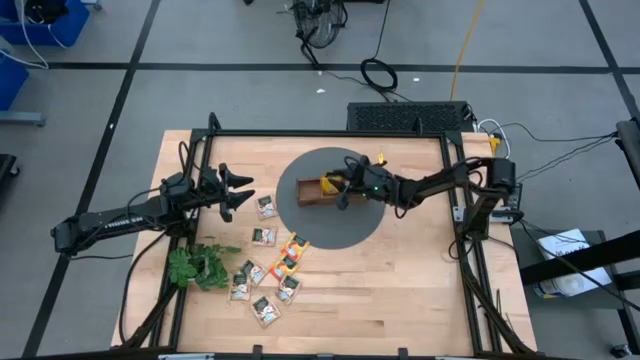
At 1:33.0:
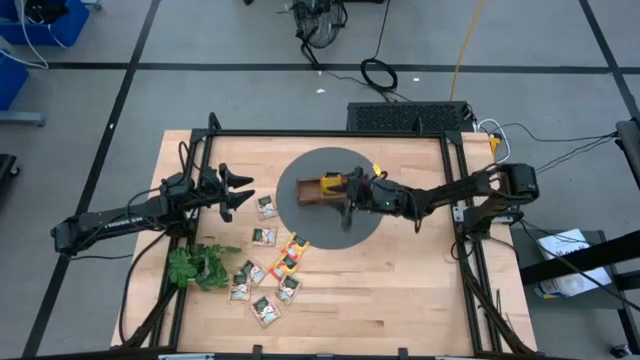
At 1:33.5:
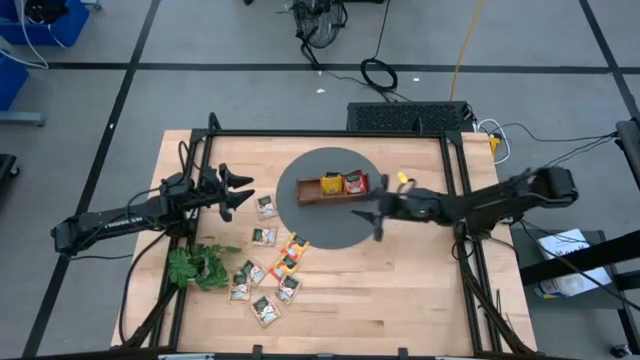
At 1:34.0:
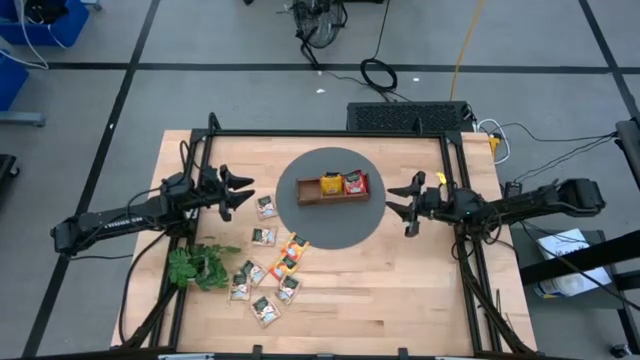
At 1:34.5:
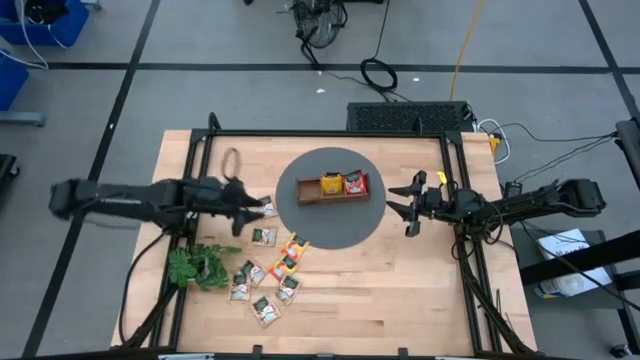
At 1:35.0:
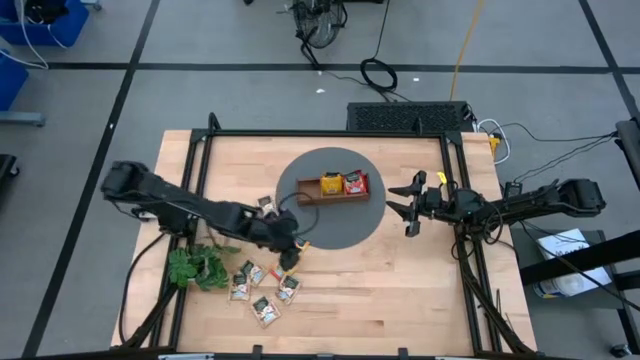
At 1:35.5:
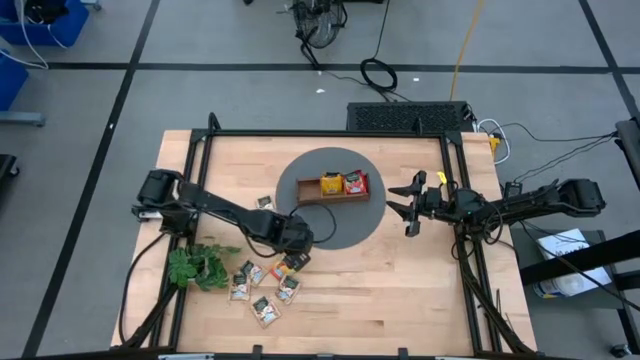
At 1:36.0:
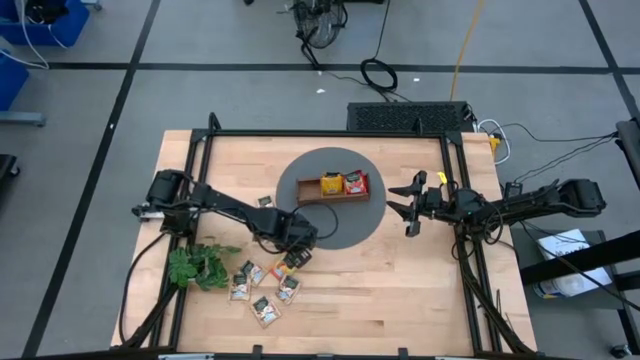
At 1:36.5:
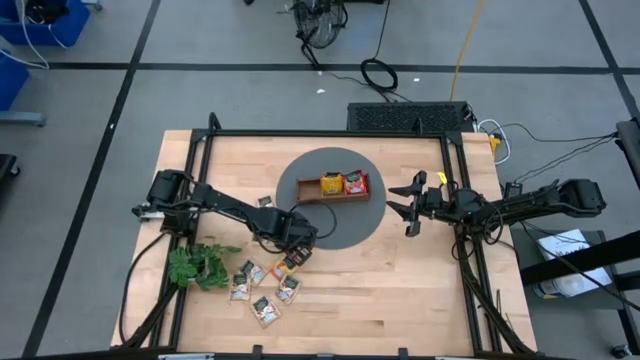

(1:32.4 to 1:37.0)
Task: Pick & Place Tea
Put the yellow tea bag into the middle section of the wooden organizer

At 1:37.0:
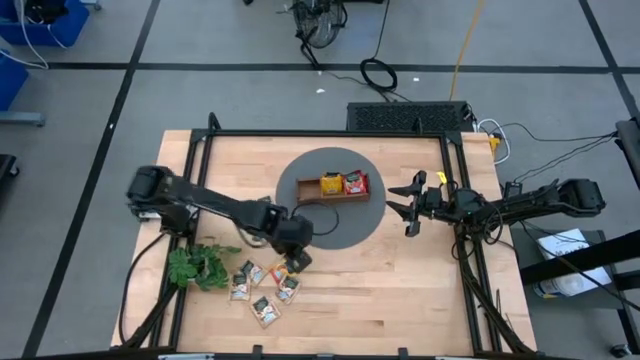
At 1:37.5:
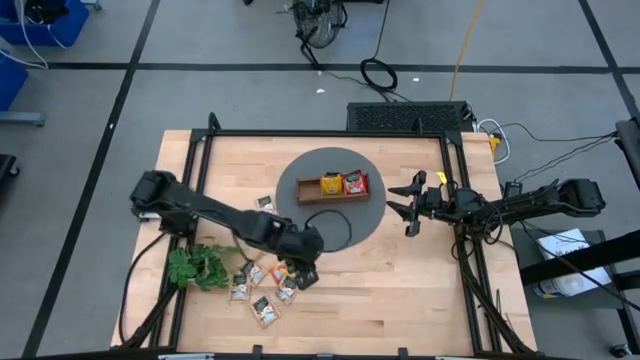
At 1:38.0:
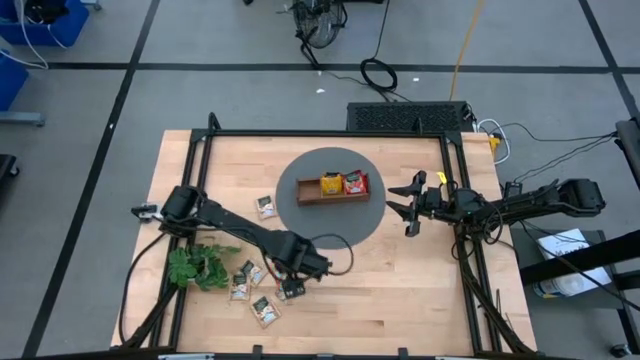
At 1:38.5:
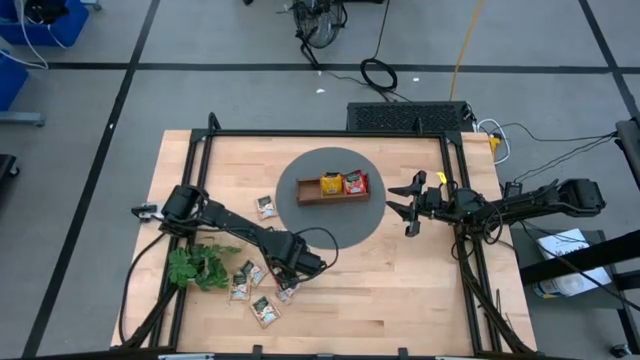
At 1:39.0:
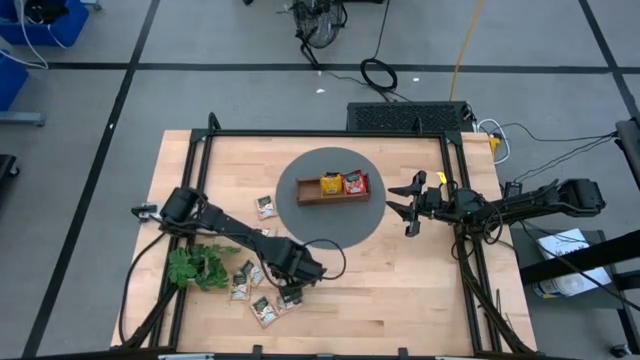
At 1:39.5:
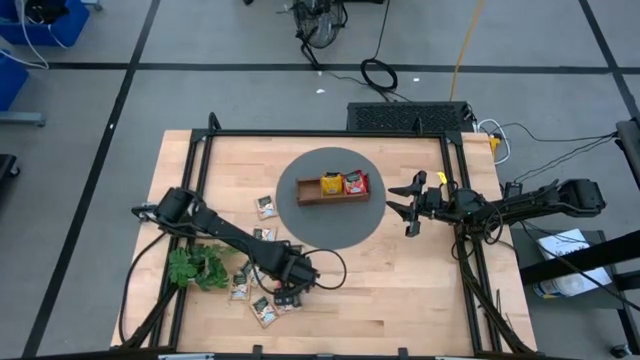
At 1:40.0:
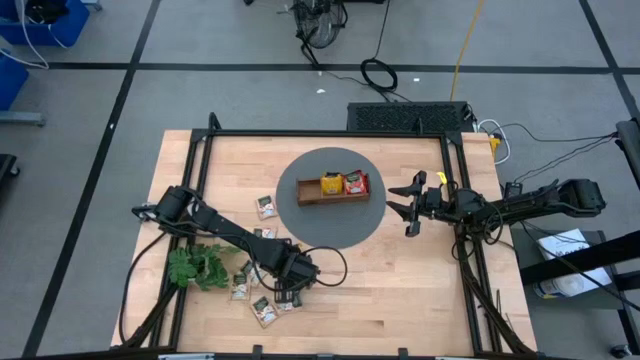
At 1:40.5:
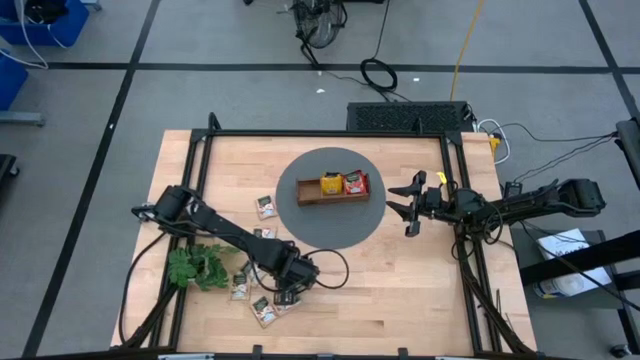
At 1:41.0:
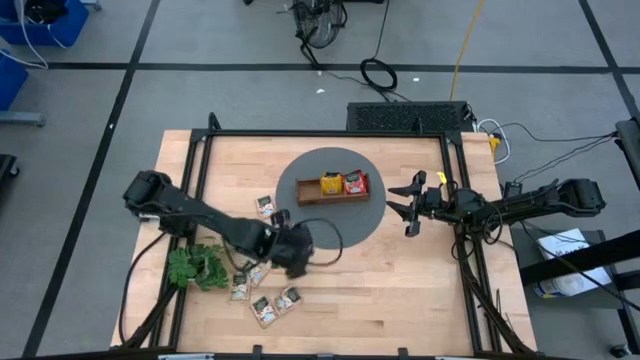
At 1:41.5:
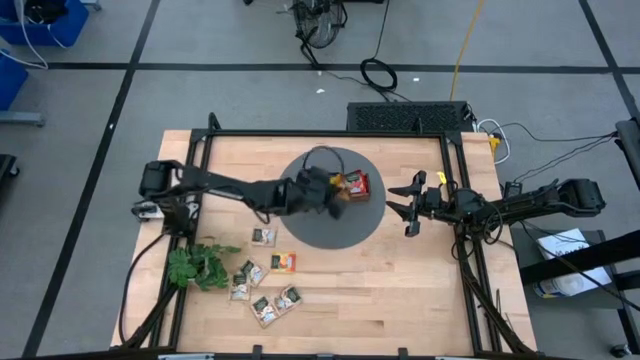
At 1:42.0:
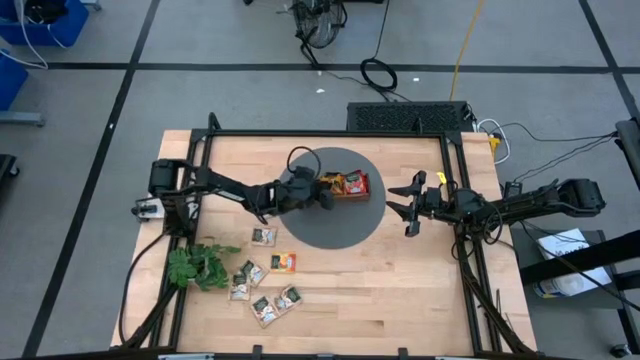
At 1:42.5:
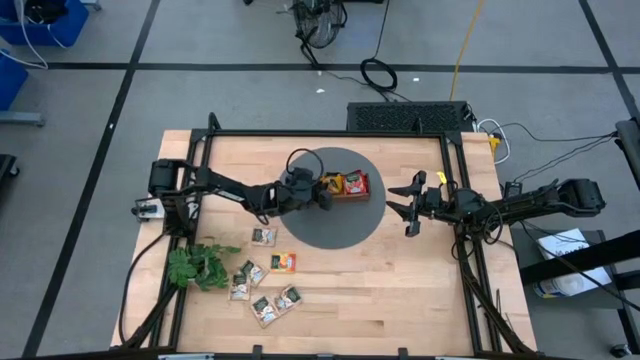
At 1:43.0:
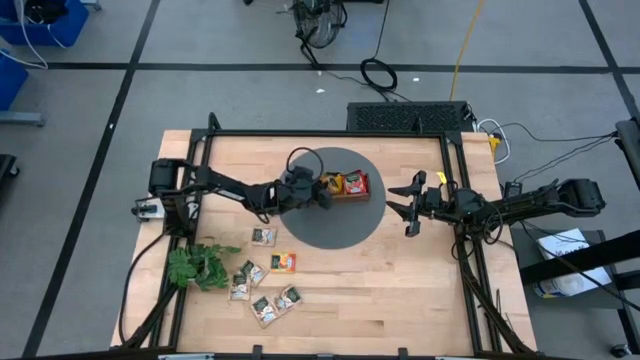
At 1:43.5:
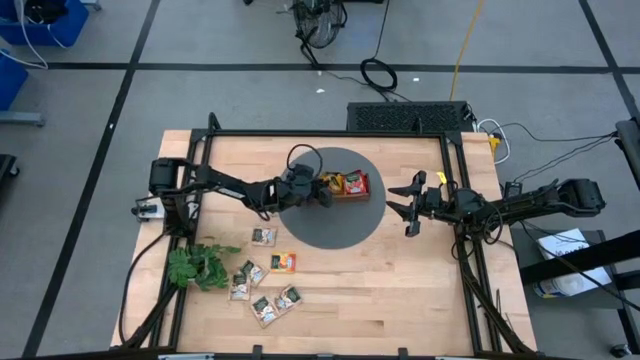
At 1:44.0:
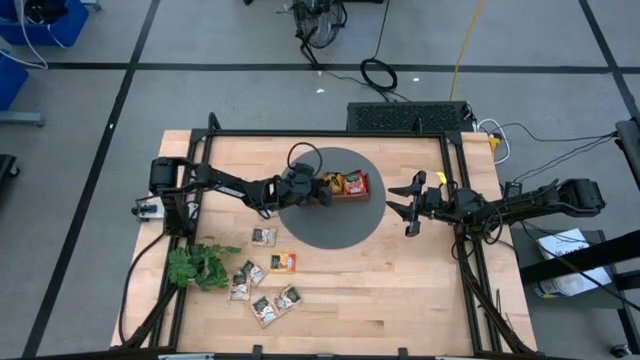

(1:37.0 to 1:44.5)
Put the yellow tea bag into the middle section of the wooden organizer

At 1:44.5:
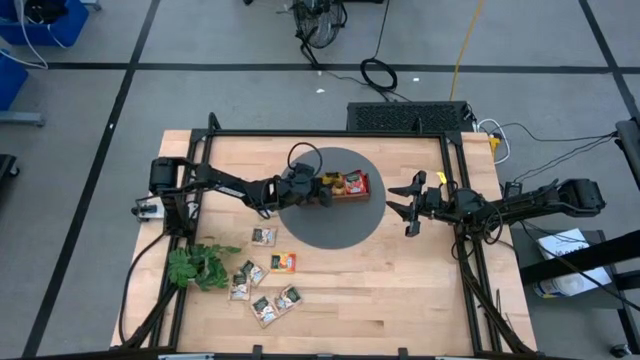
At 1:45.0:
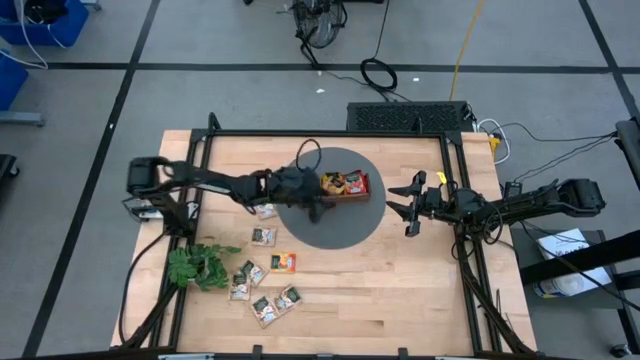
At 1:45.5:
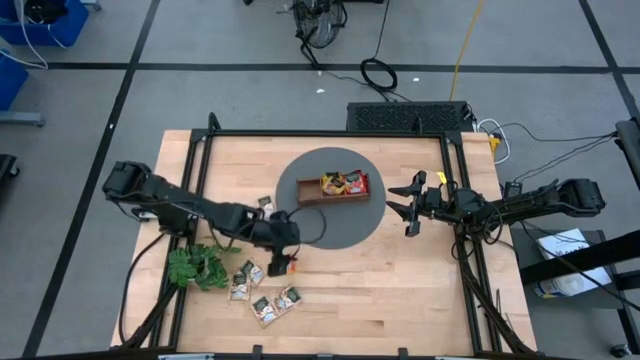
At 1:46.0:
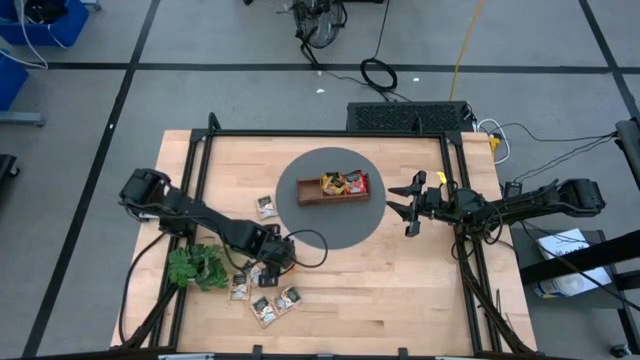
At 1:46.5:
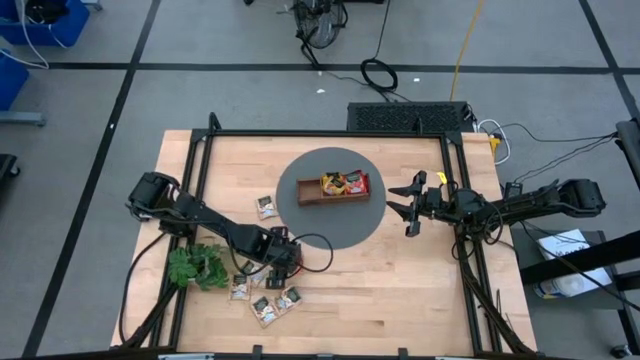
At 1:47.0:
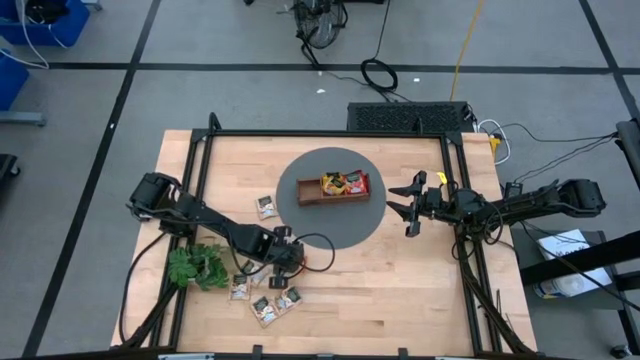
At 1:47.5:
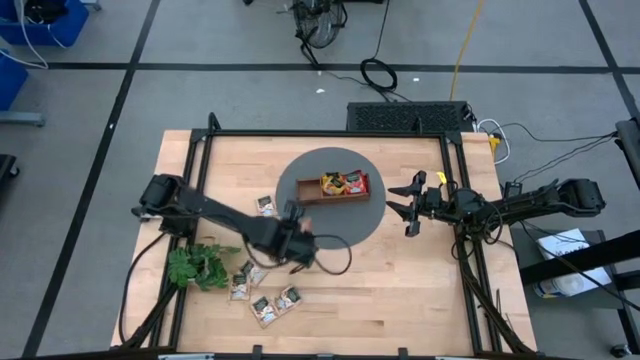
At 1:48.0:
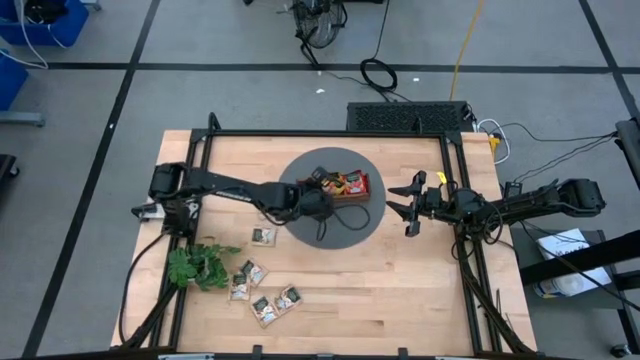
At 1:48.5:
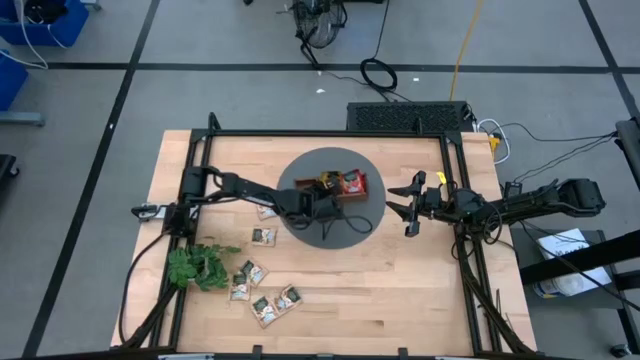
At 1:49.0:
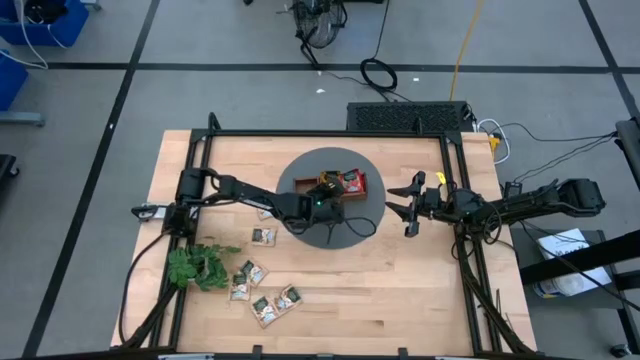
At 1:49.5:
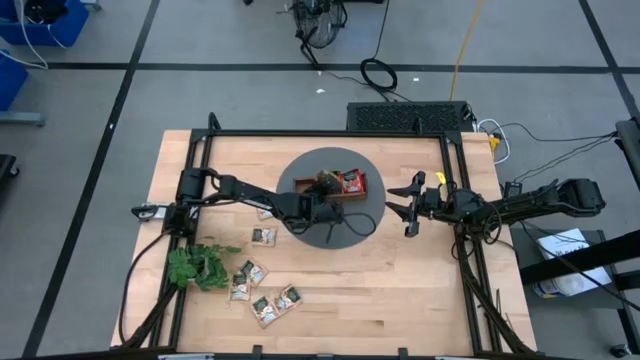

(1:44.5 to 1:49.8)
Put the yellow tea bag into the middle section of the wooden organizer

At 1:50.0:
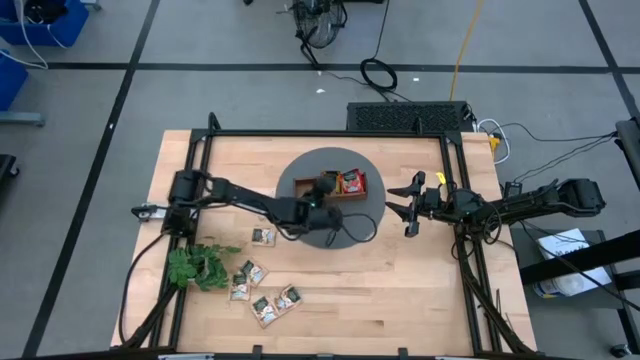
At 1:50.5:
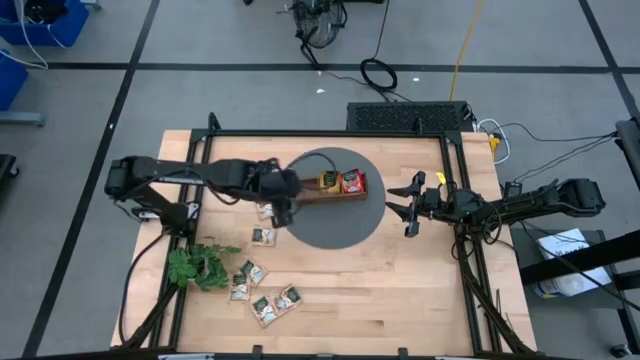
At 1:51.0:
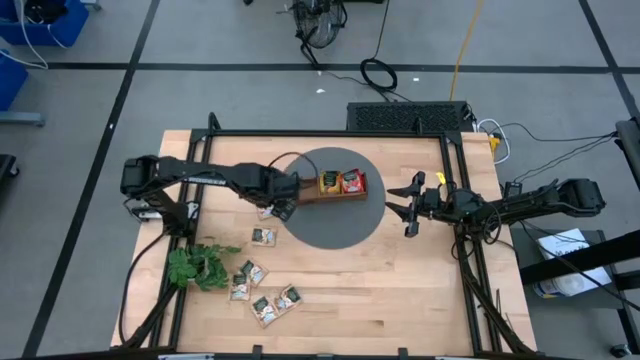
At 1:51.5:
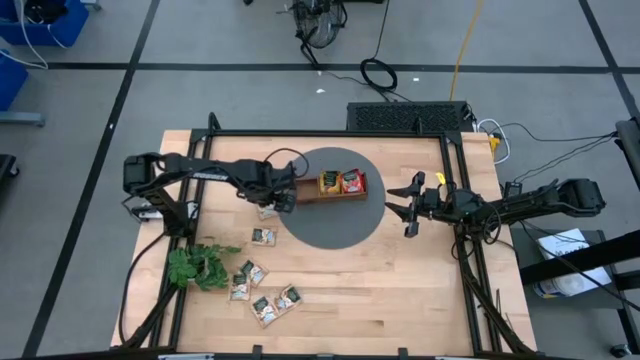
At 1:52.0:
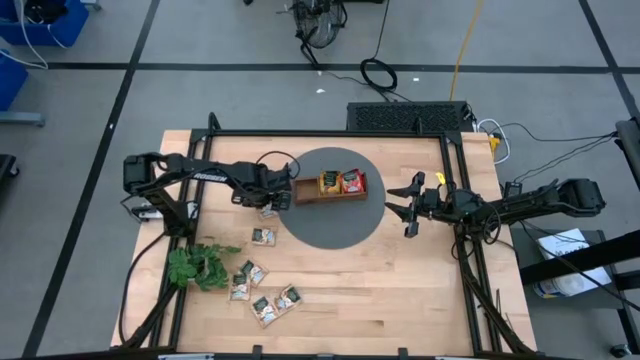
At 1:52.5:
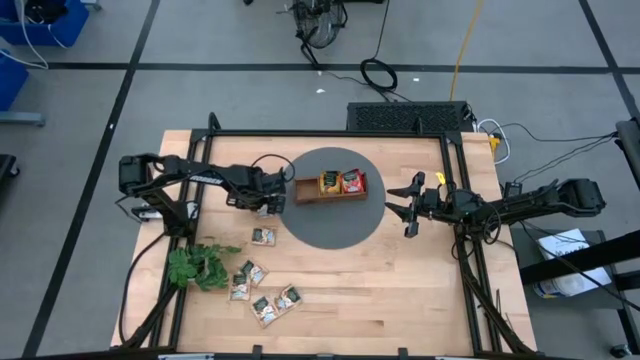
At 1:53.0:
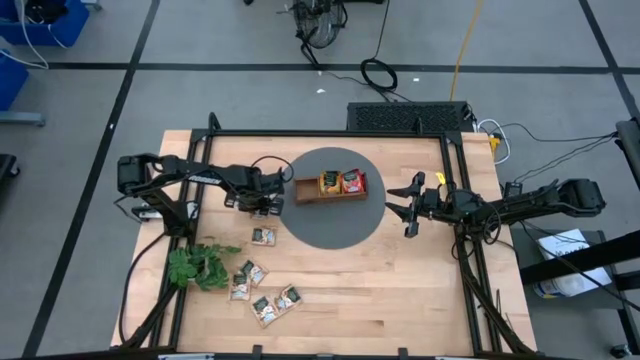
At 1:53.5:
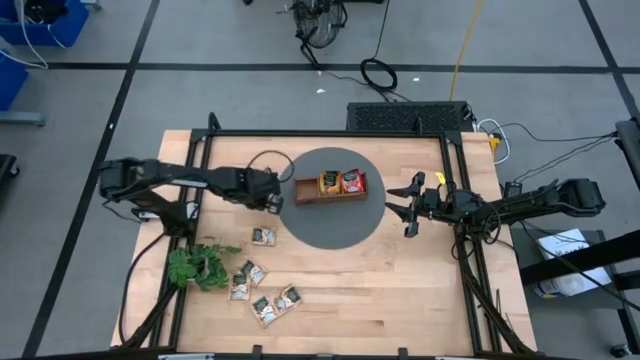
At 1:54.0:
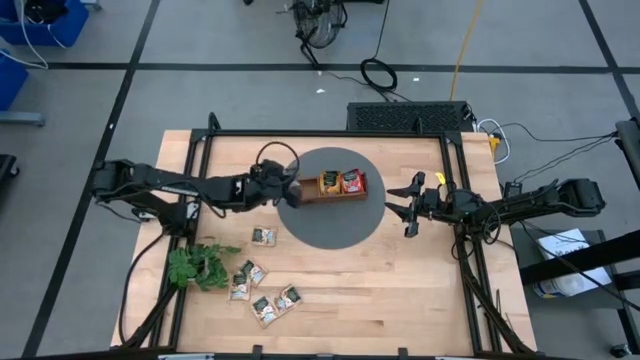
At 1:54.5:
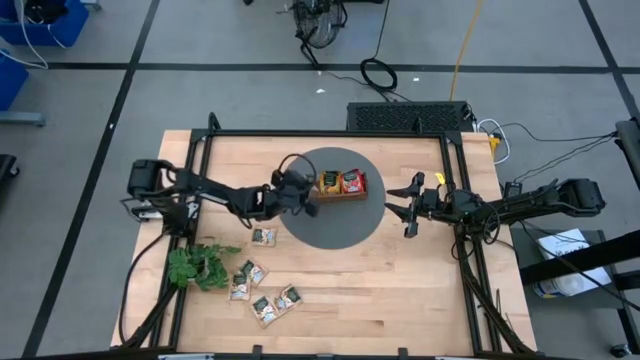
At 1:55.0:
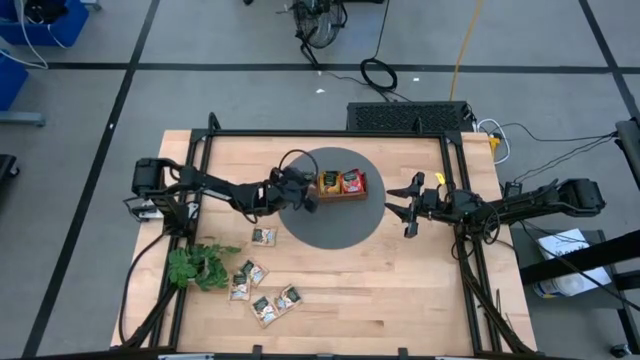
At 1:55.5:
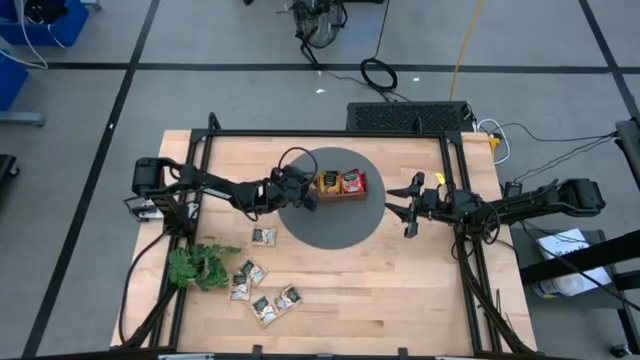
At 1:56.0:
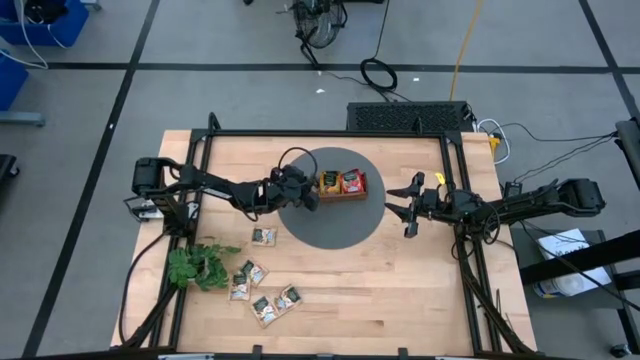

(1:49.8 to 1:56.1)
Put the brown tea bag into the left section of the wooden organizer
